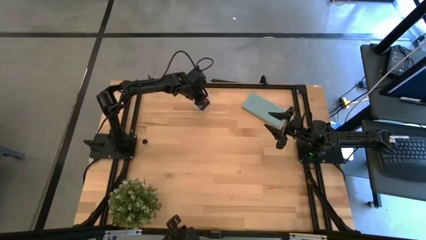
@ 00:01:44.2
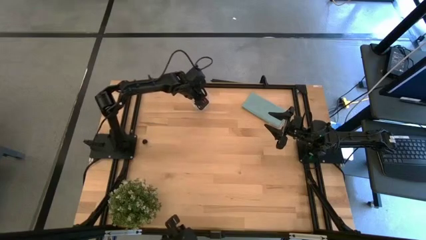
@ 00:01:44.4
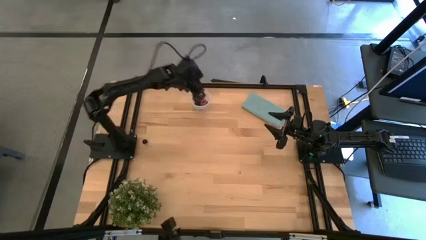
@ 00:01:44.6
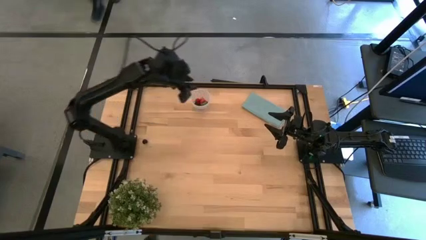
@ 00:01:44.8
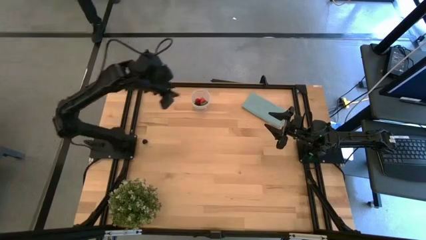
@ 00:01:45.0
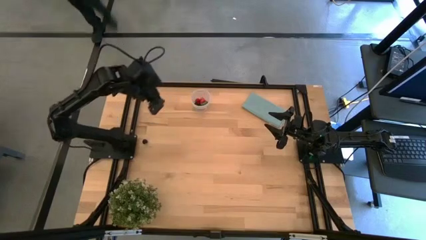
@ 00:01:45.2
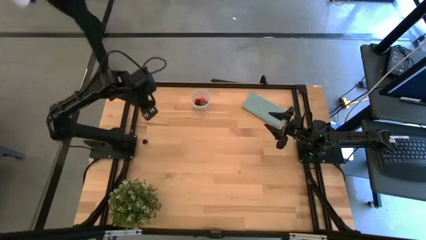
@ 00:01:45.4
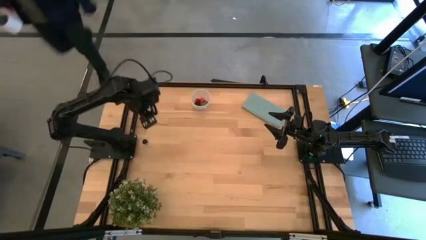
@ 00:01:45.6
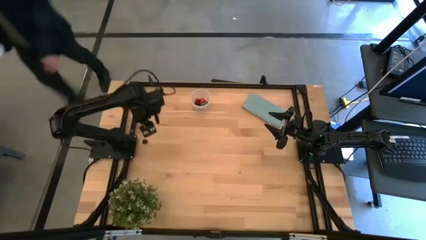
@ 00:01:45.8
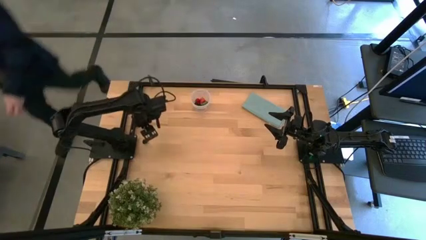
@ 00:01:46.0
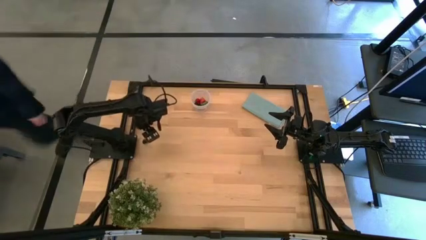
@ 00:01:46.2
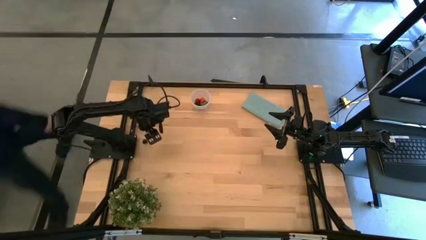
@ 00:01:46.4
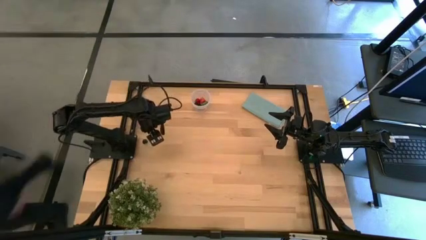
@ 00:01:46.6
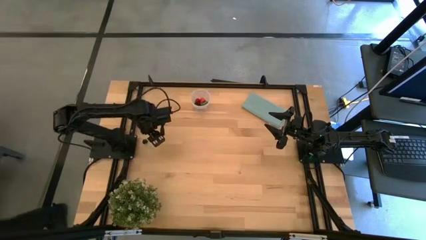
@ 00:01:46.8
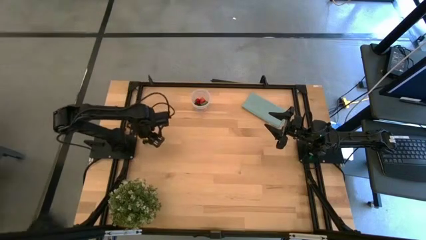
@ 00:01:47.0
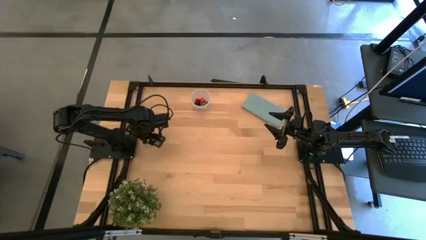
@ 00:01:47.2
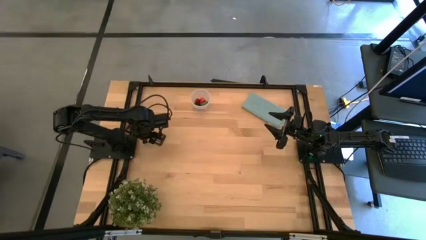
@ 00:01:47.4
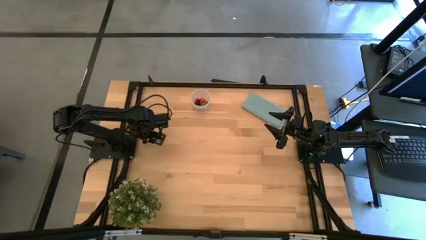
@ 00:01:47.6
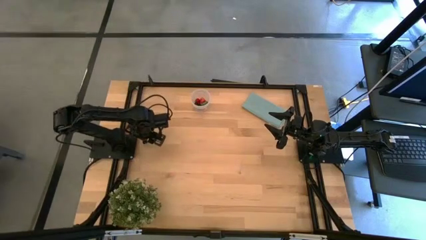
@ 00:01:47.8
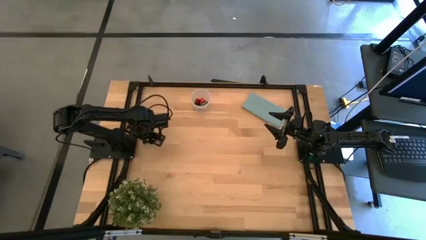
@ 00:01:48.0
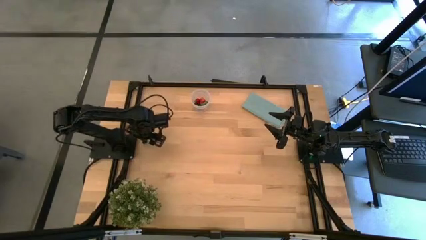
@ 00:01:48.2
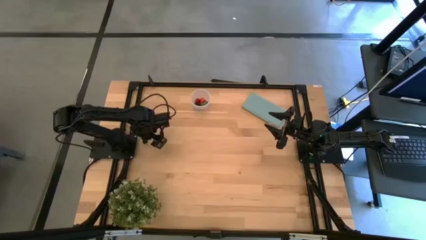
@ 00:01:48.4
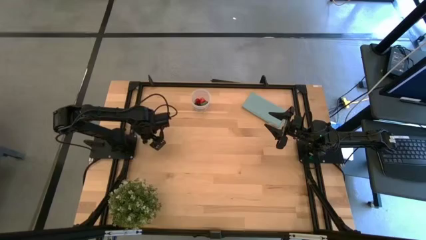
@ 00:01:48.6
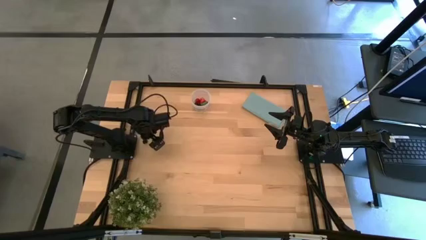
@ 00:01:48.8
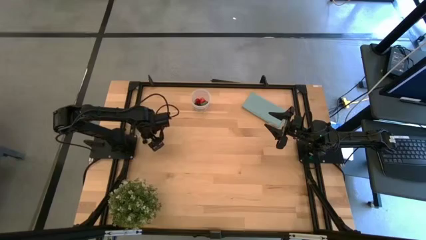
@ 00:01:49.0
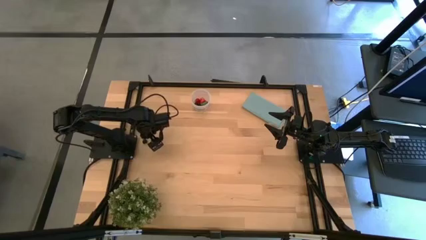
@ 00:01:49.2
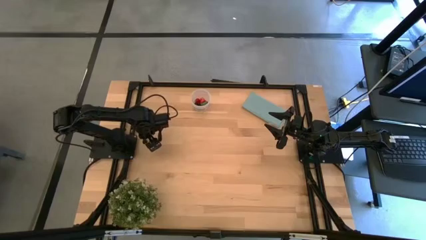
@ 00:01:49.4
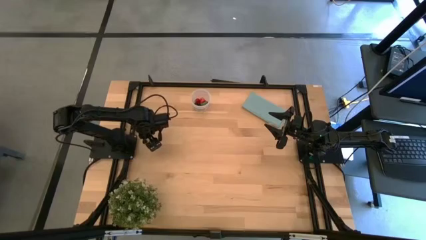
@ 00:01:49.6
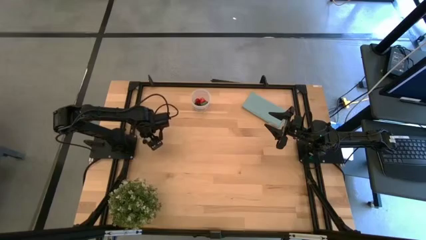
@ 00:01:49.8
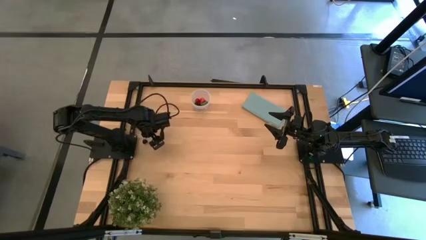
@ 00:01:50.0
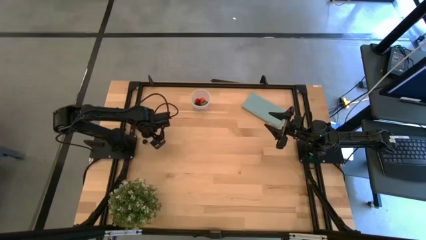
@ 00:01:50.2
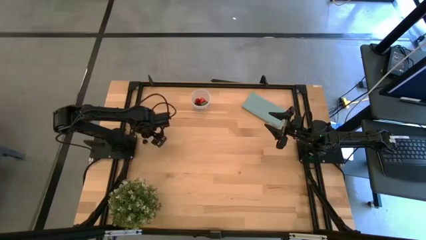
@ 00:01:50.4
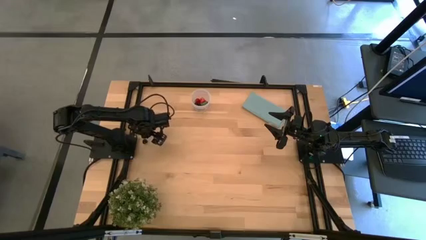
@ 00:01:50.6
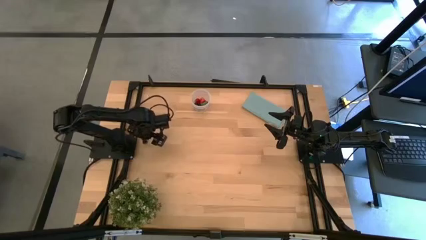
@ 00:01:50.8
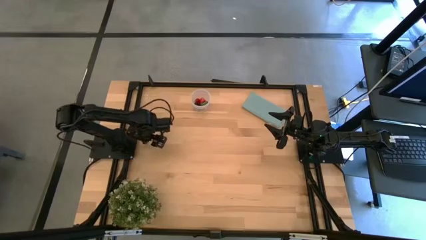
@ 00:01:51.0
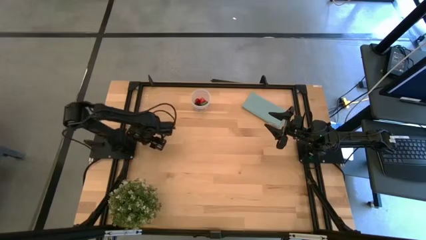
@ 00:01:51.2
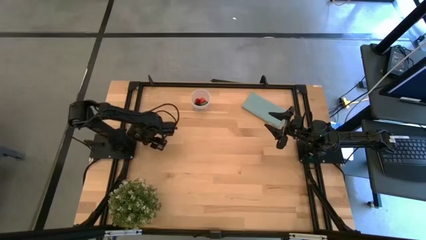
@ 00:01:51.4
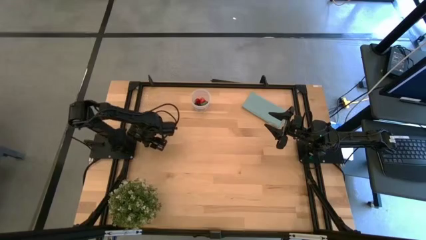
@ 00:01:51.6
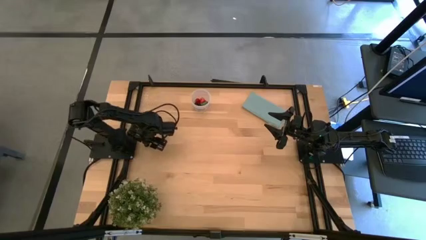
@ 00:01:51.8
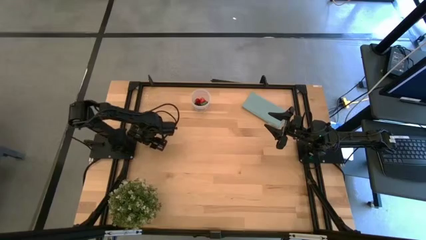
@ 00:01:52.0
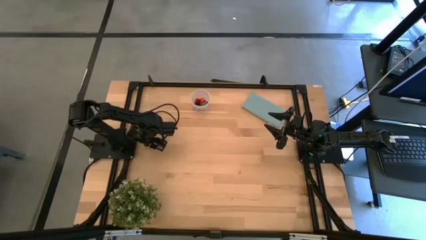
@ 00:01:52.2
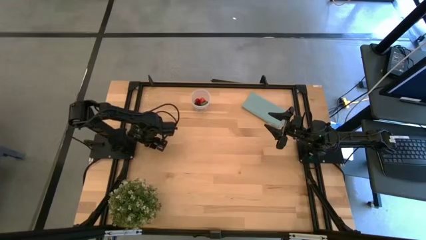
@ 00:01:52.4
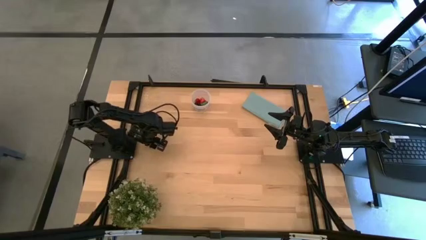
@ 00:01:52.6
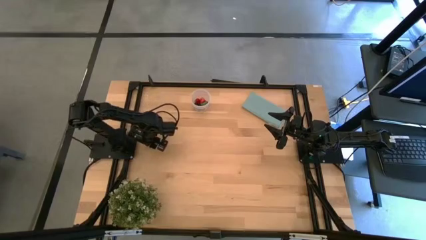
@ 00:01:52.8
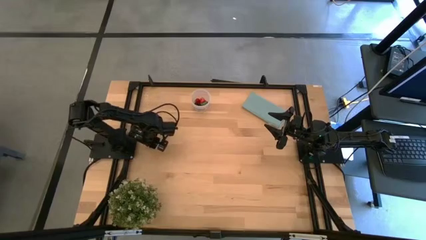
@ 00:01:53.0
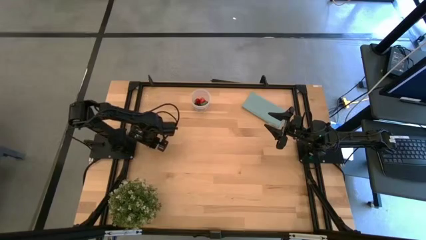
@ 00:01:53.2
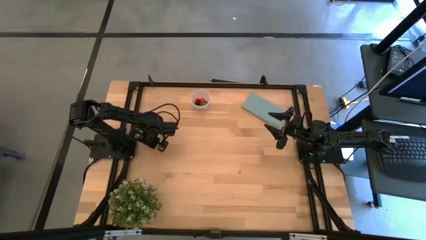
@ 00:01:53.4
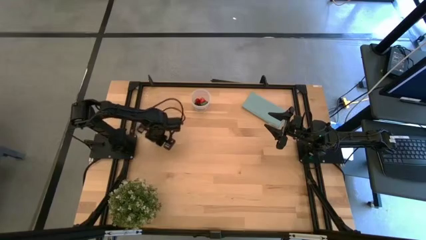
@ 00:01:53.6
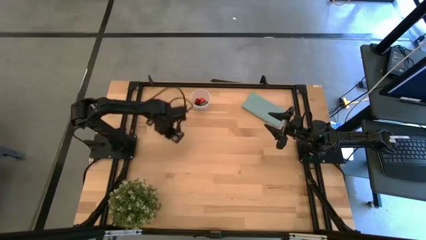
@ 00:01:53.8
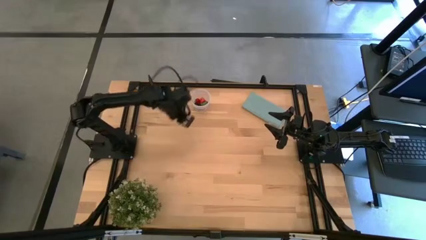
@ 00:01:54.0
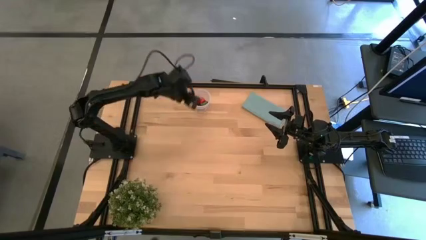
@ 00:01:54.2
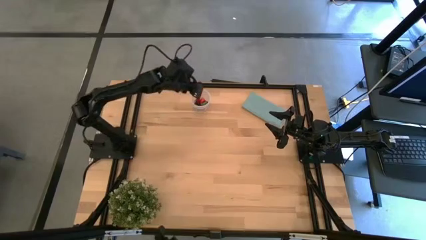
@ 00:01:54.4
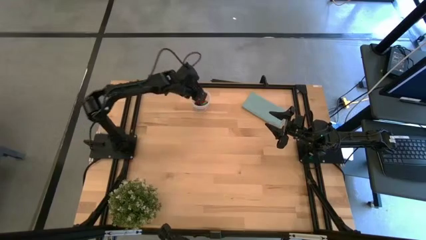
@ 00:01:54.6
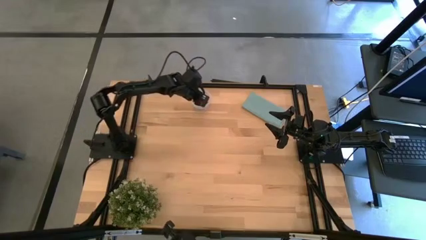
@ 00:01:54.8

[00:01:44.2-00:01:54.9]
Task: Pick and placing Produce into tupperware
Put the black cherry into the transparent container

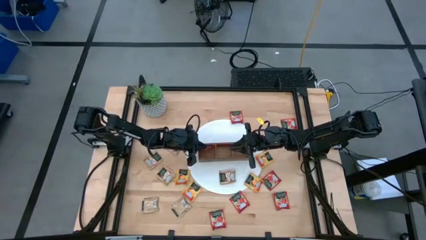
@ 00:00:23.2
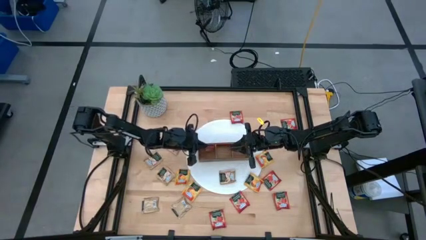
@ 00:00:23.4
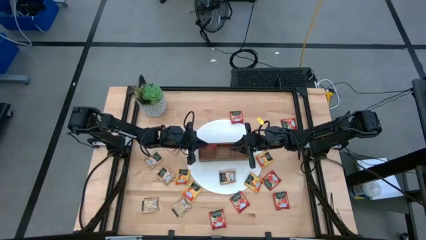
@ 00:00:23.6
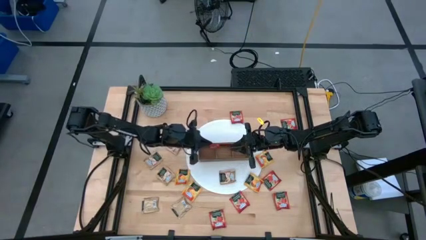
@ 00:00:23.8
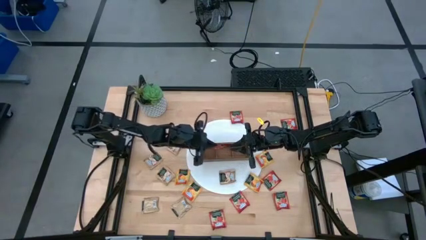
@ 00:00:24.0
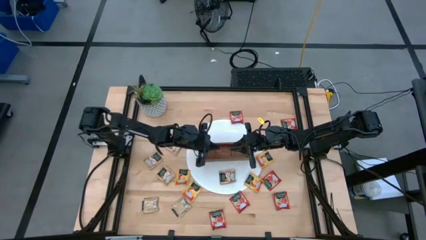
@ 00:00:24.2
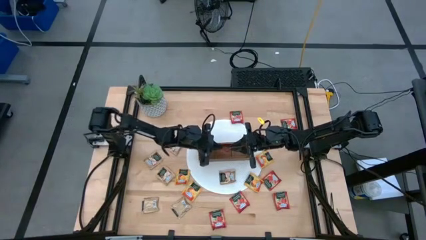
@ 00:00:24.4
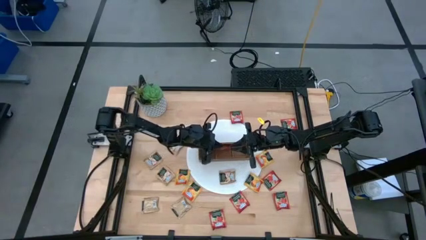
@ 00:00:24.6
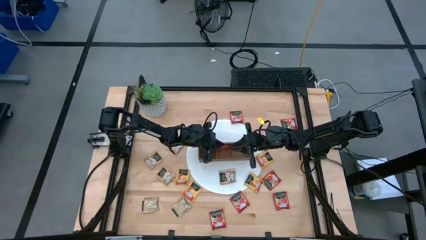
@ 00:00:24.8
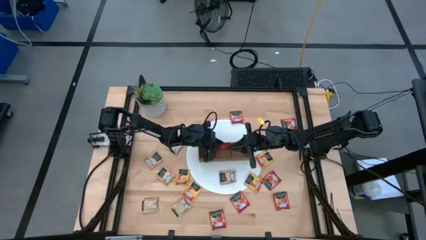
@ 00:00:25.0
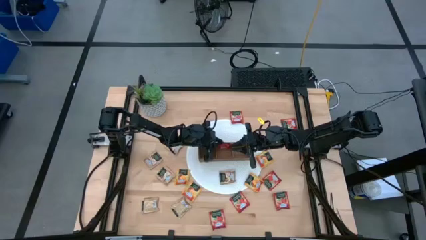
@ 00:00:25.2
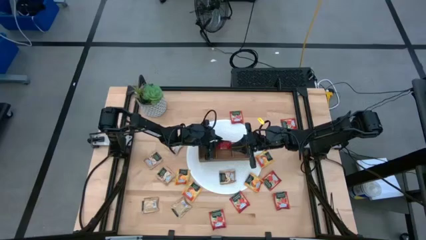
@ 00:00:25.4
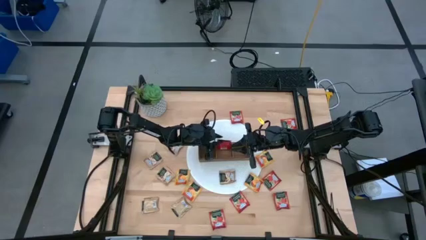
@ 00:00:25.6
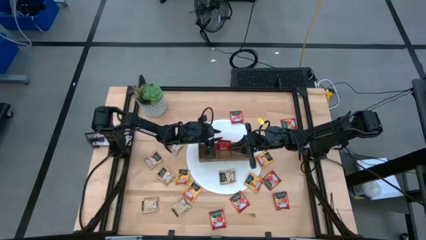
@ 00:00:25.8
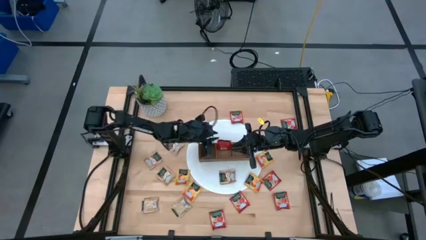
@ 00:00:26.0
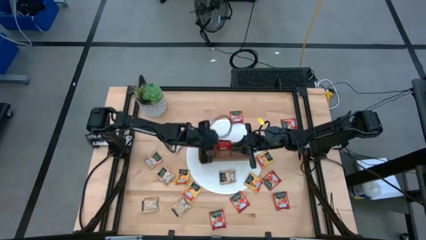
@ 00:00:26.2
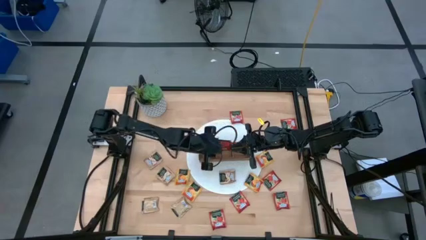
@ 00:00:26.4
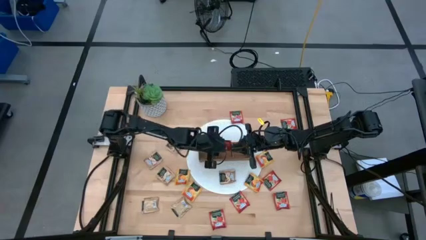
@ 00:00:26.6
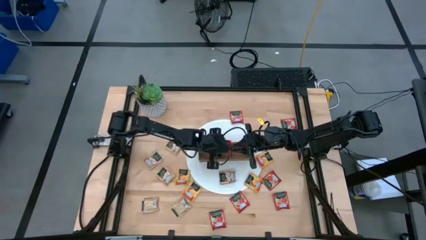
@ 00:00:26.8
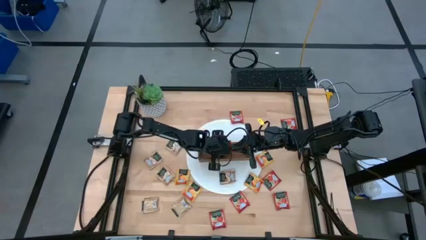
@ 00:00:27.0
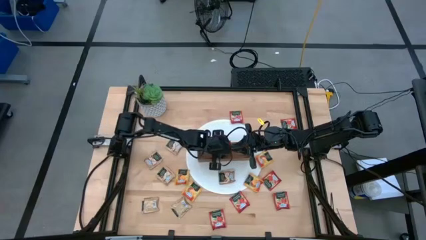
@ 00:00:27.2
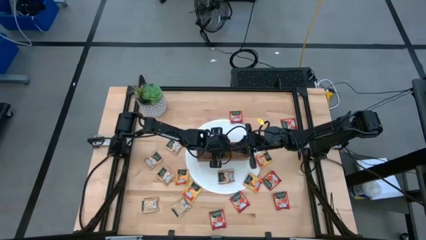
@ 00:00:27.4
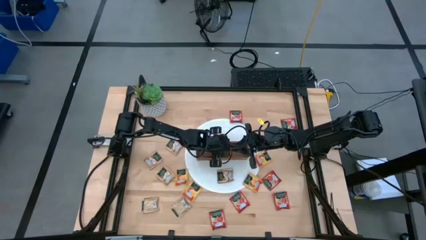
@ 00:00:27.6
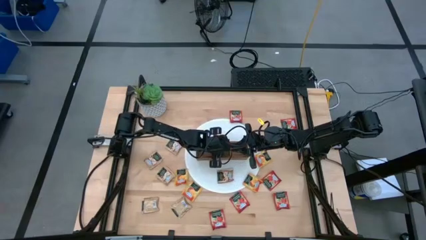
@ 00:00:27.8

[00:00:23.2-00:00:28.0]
Task: Pick & Place Tea
Put the red tea bag into the middle section of the wooden organizer
